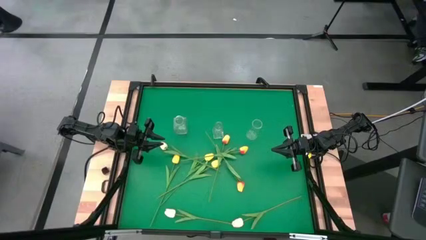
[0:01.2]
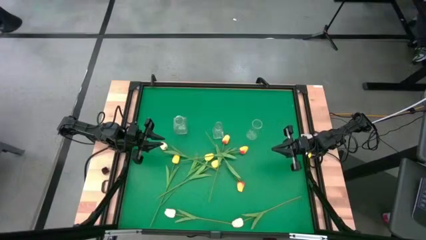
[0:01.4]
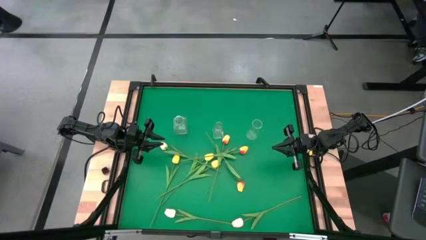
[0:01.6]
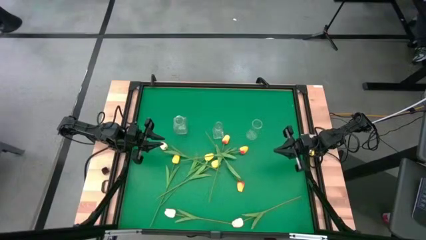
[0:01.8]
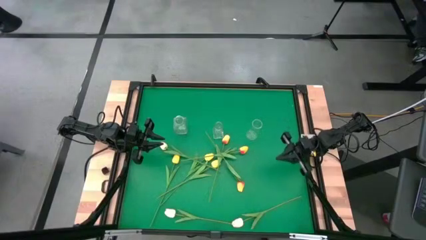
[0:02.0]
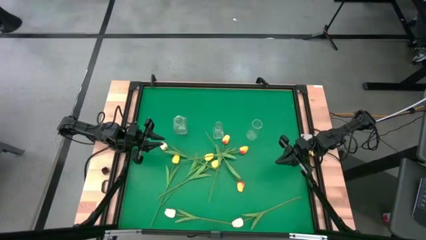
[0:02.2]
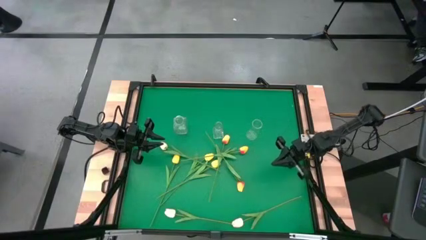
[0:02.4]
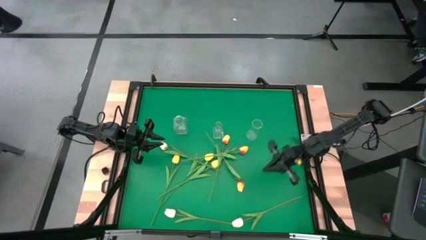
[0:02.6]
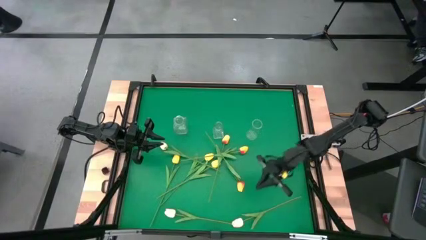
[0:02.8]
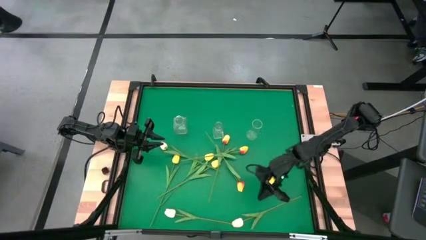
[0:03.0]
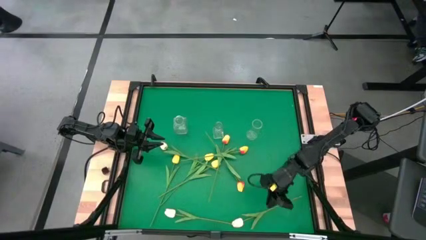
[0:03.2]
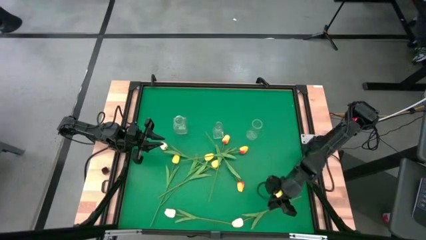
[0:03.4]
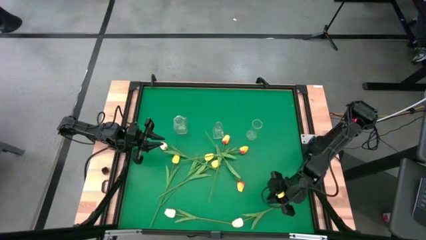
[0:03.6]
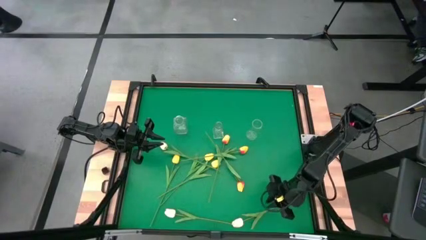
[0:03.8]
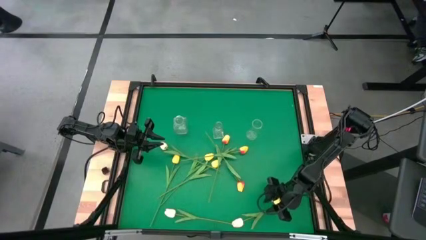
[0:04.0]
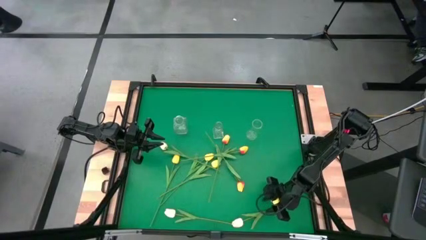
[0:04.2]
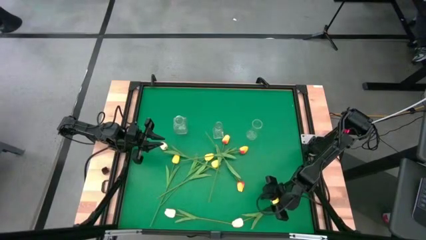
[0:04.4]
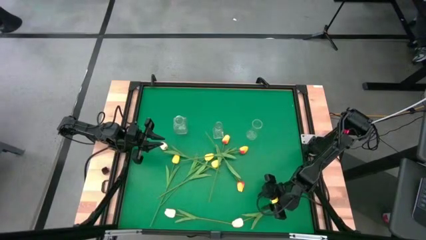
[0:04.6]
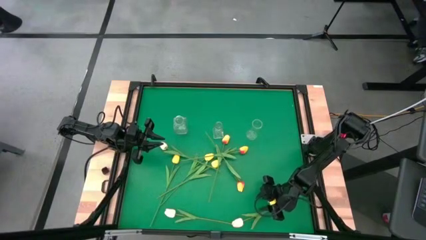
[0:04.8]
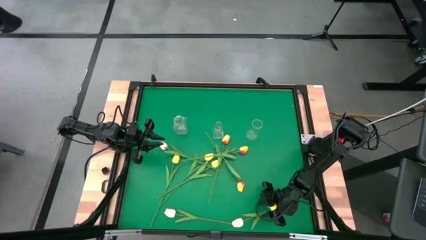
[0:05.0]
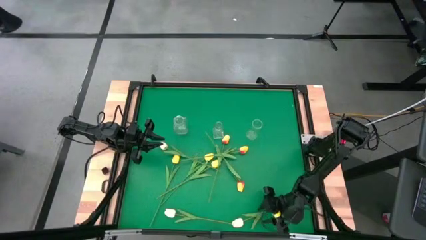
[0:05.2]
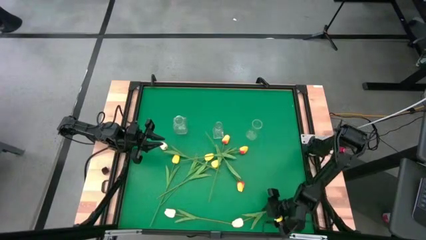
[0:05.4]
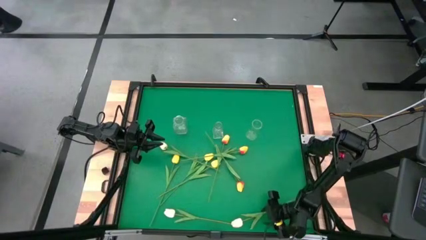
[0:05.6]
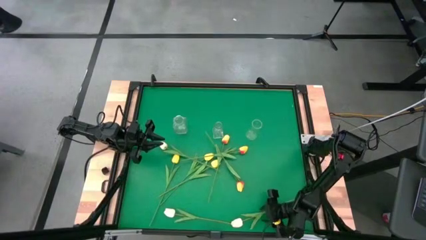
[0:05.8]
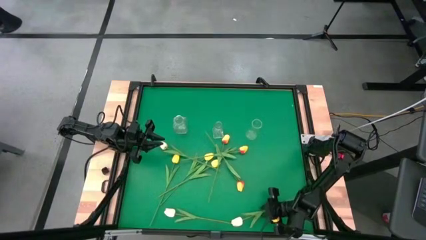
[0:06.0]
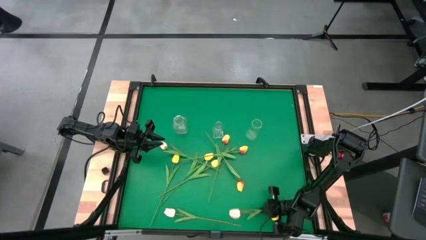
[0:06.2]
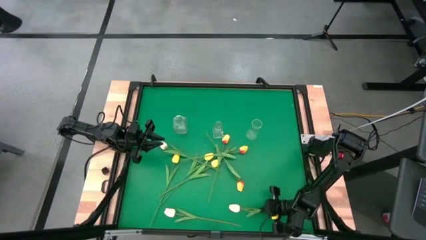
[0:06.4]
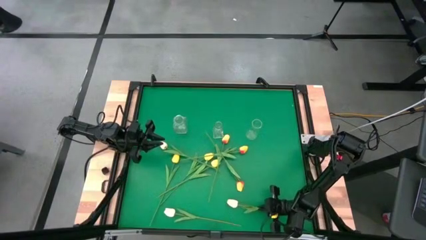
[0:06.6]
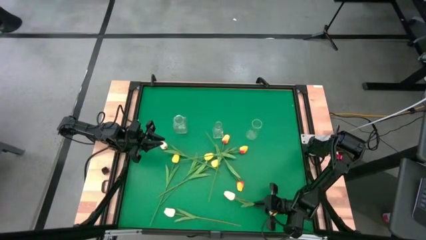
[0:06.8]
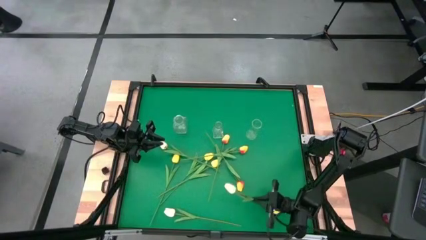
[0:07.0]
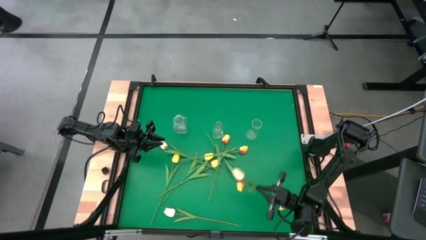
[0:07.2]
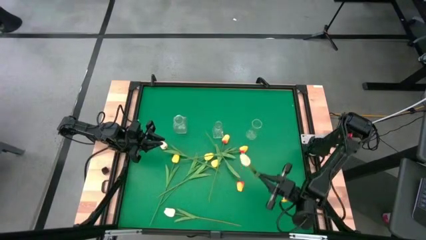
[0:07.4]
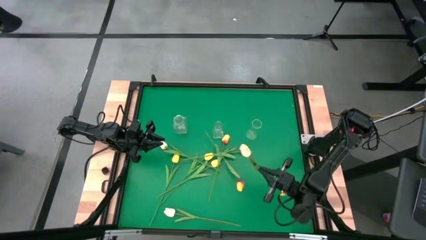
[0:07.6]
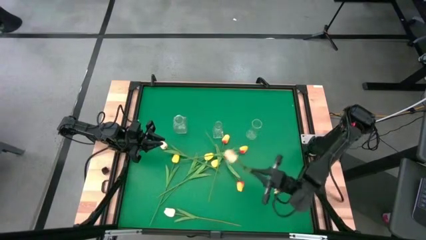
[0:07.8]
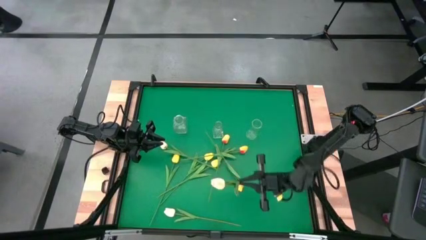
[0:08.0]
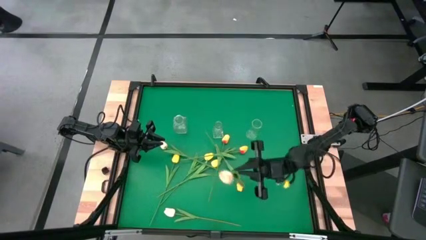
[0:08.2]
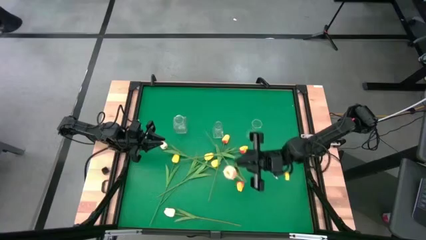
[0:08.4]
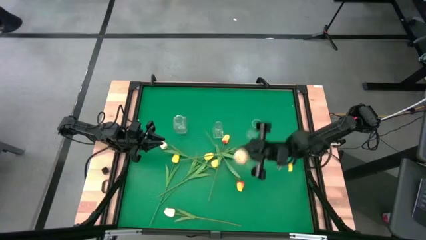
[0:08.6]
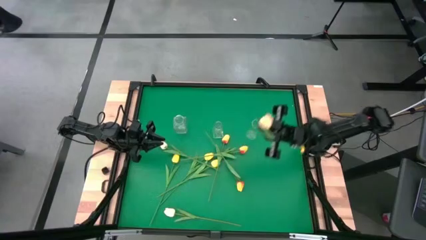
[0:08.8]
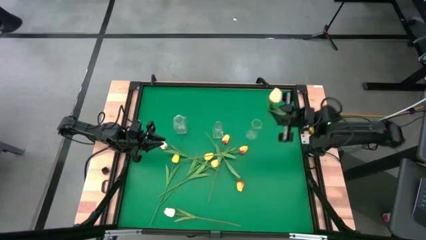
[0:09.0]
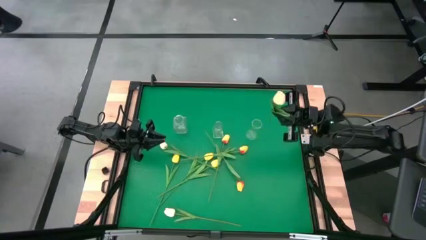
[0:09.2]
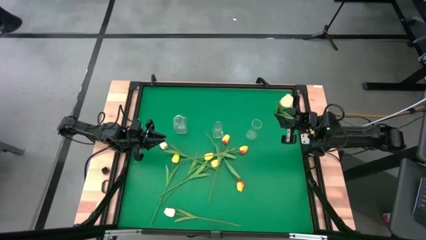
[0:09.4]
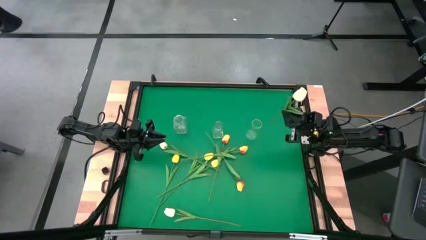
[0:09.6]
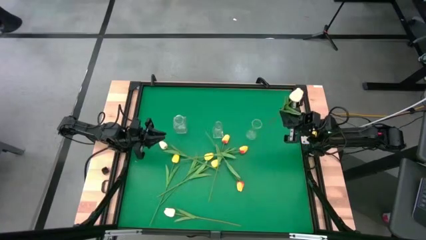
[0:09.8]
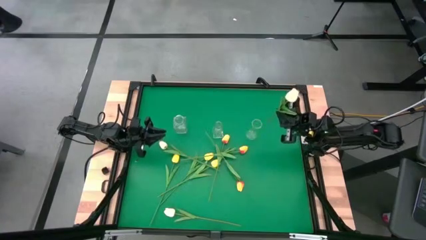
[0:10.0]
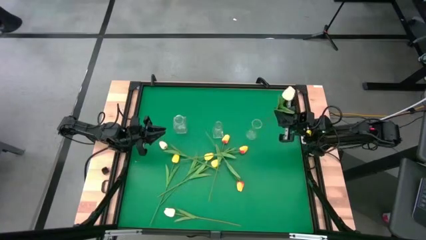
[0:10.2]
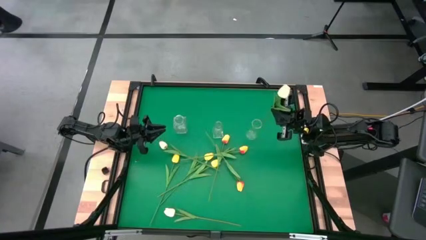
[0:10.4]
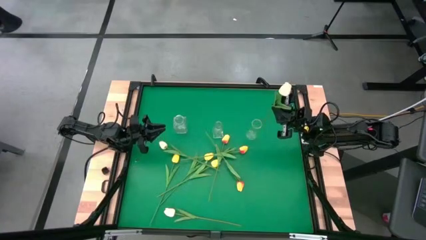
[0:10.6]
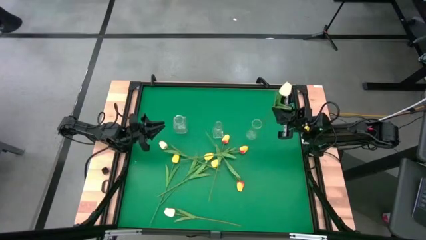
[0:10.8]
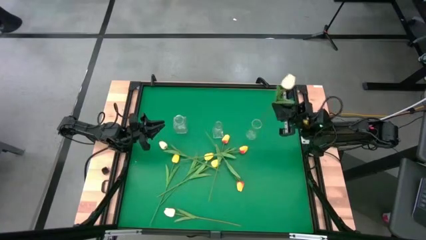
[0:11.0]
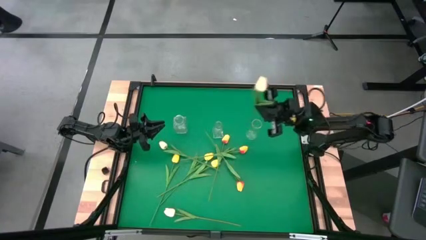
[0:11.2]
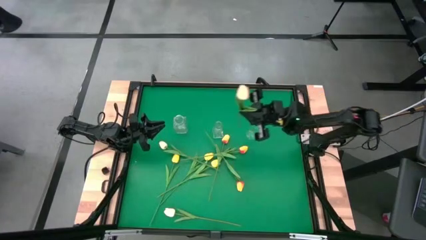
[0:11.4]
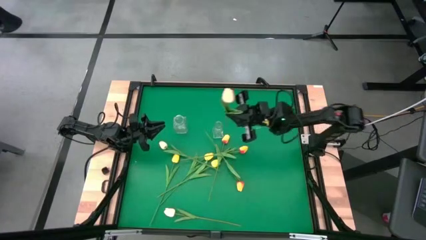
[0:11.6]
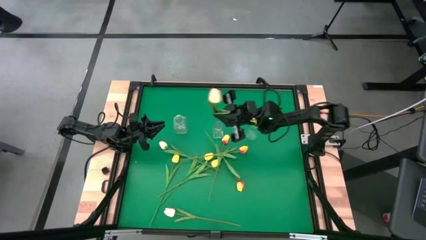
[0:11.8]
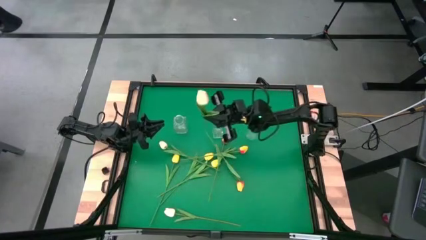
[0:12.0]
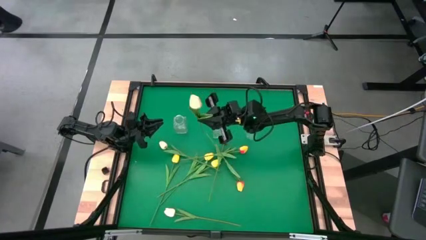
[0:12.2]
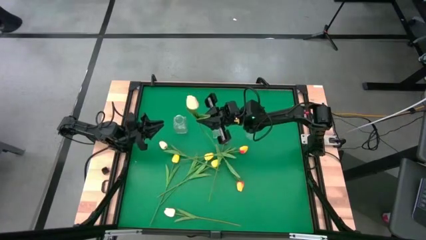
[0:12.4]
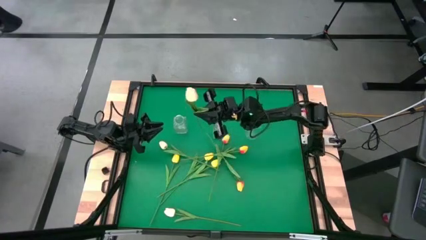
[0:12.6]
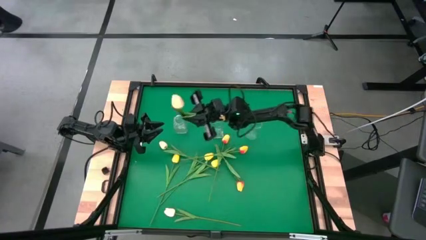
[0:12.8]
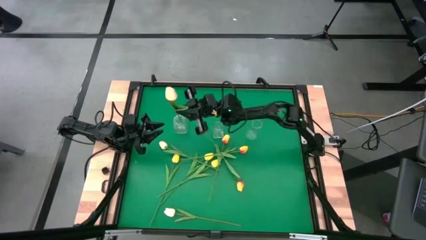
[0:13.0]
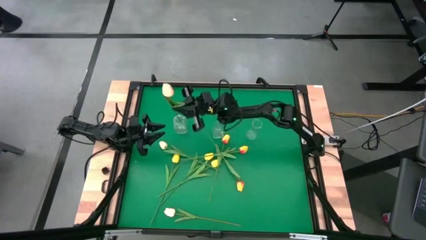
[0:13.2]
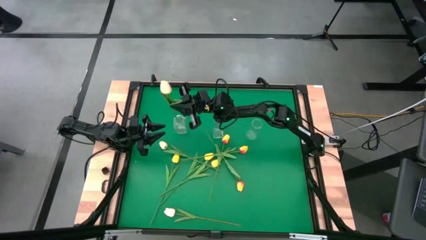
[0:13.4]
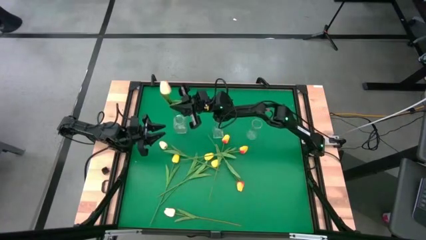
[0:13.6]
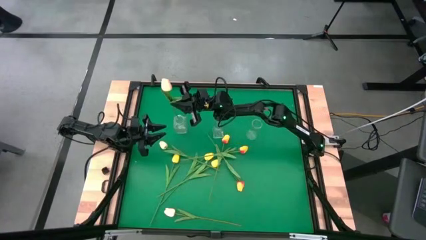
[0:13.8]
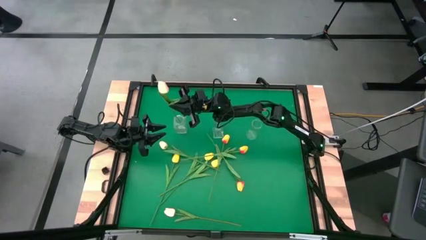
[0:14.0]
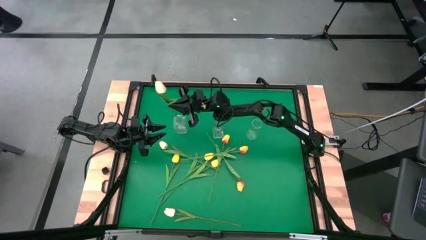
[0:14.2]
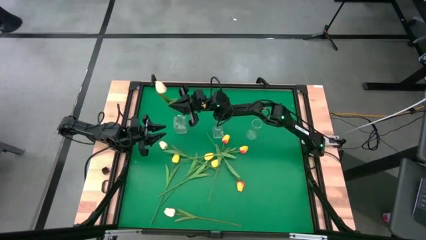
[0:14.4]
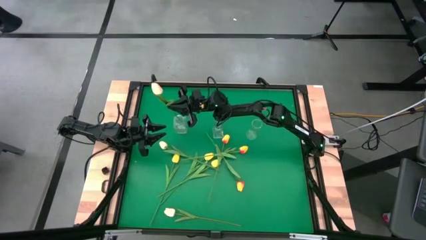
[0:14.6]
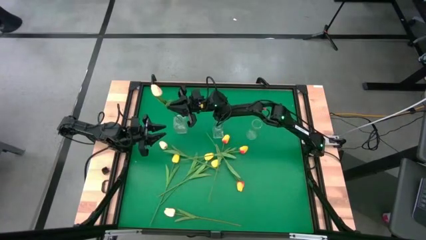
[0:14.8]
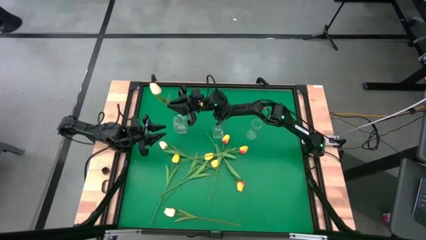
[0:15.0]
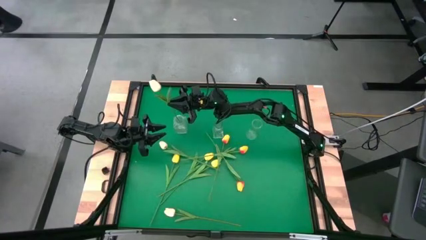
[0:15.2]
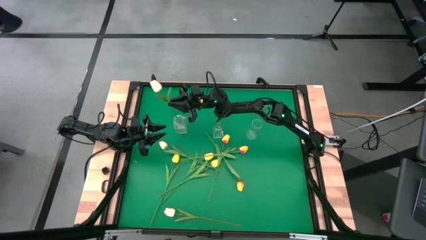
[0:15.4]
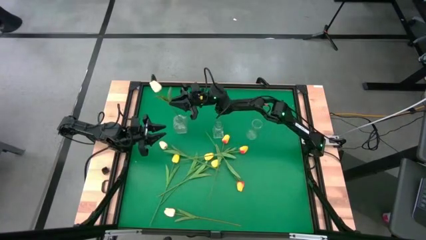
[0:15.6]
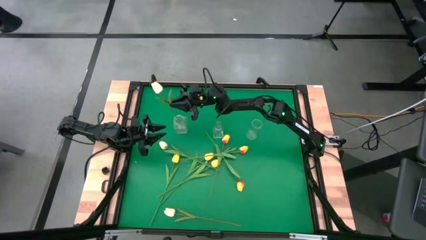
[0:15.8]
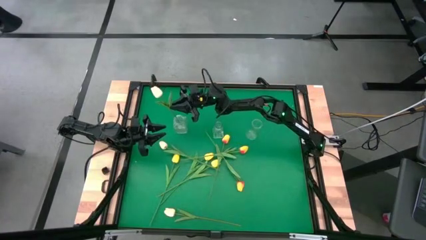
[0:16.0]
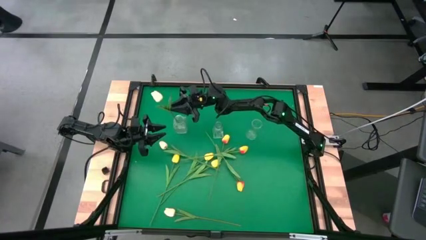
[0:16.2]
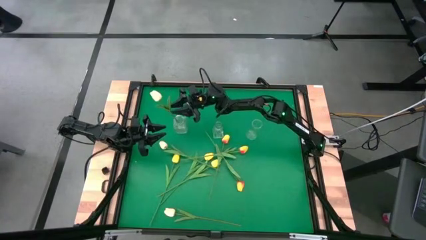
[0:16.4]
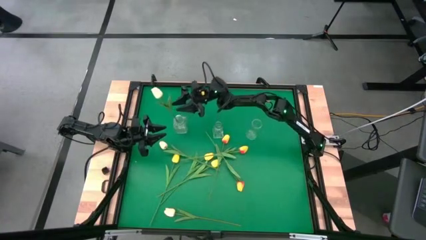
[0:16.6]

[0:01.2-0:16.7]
Task: Sort flowers into vase by color
Put the bottom right white flower into the left transparent vase
